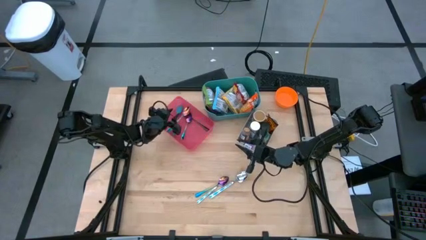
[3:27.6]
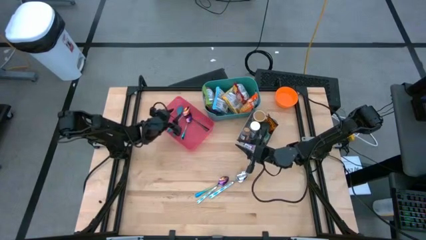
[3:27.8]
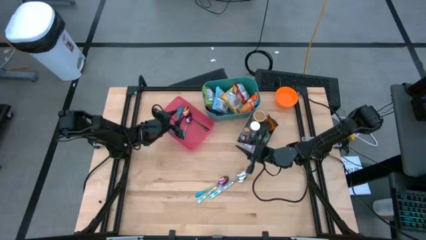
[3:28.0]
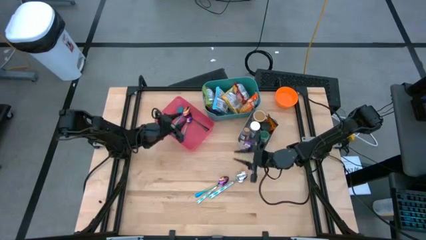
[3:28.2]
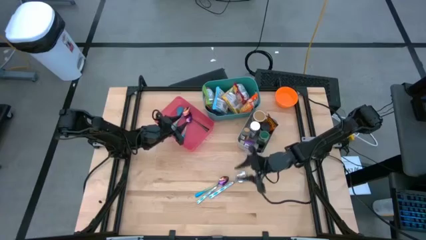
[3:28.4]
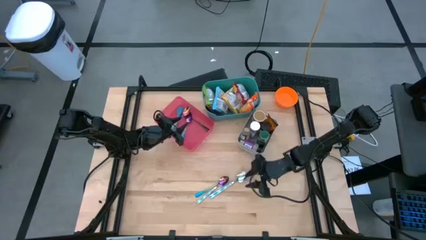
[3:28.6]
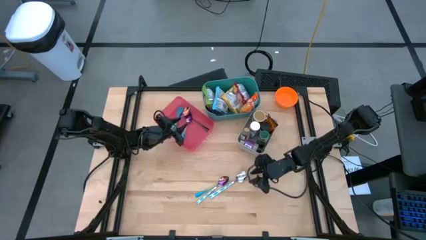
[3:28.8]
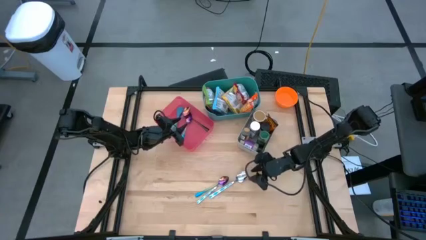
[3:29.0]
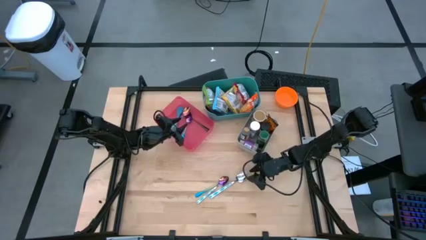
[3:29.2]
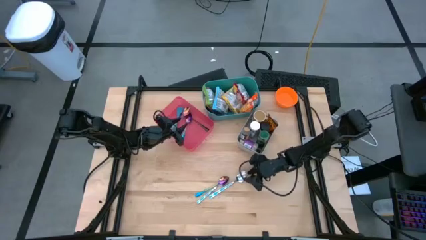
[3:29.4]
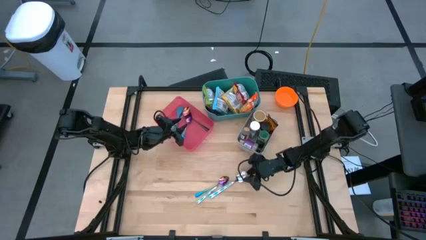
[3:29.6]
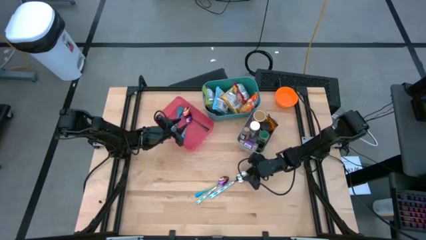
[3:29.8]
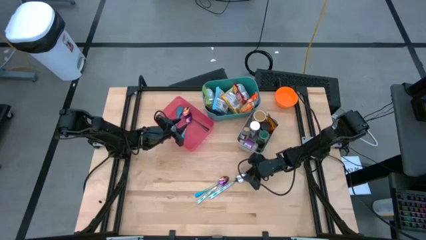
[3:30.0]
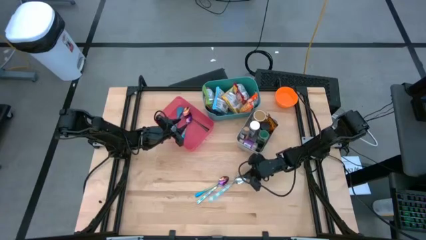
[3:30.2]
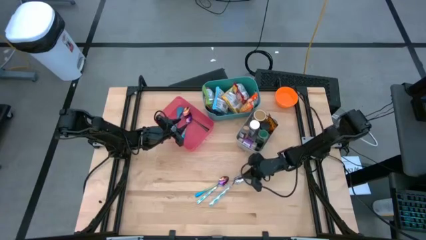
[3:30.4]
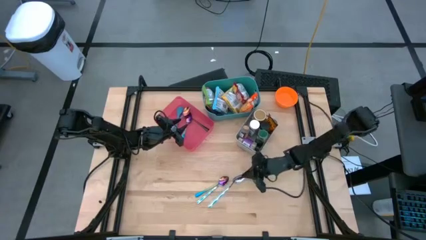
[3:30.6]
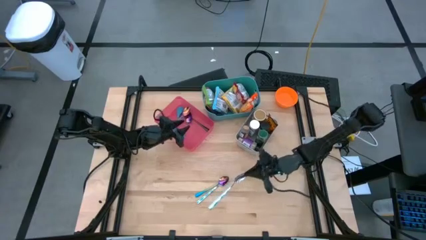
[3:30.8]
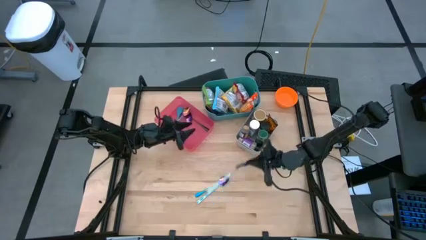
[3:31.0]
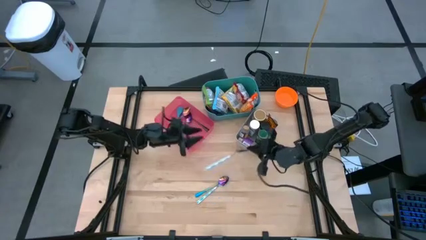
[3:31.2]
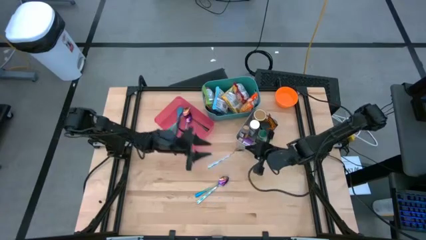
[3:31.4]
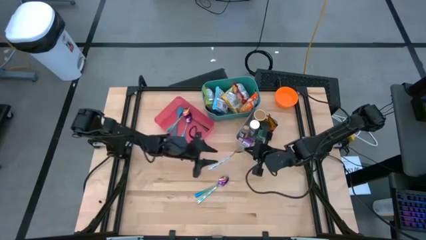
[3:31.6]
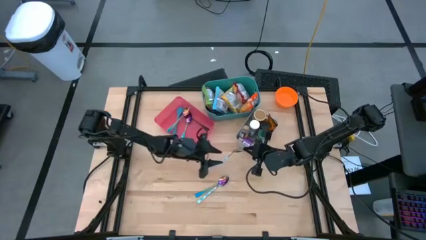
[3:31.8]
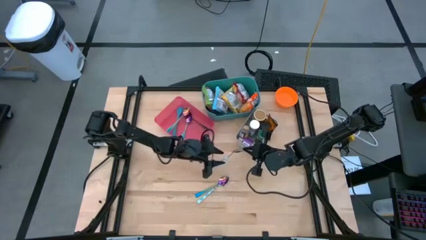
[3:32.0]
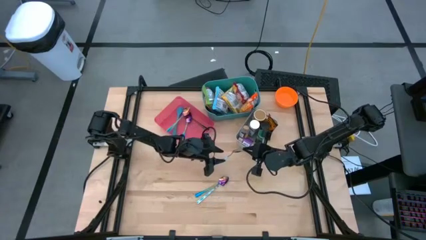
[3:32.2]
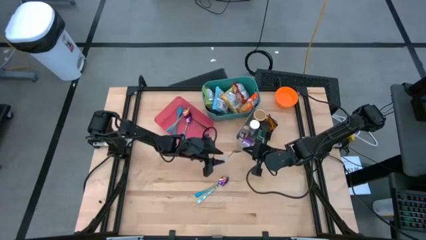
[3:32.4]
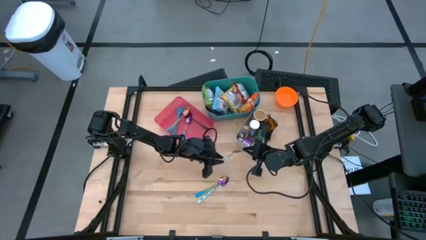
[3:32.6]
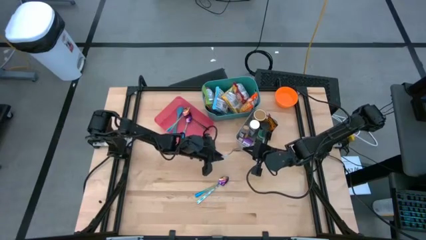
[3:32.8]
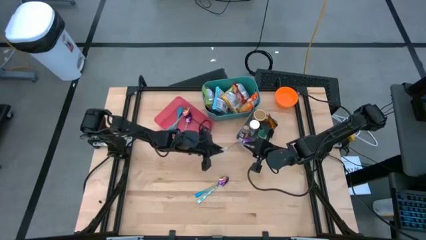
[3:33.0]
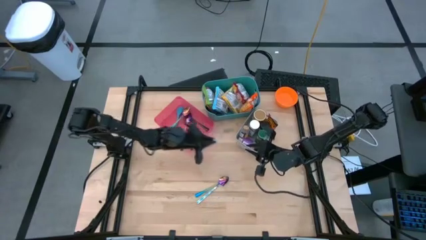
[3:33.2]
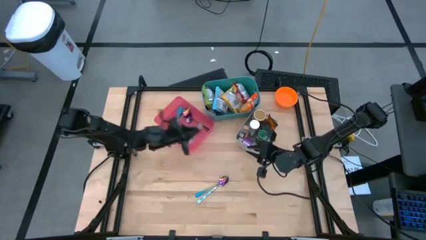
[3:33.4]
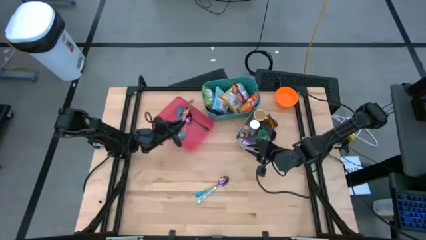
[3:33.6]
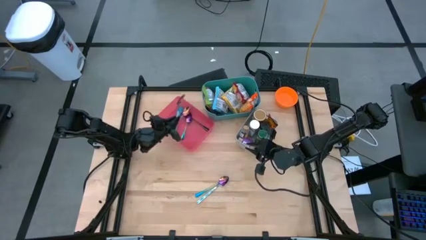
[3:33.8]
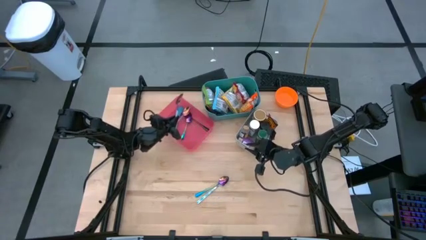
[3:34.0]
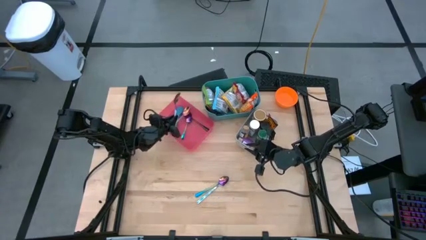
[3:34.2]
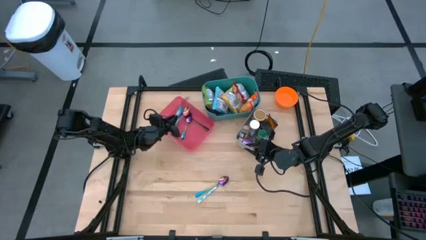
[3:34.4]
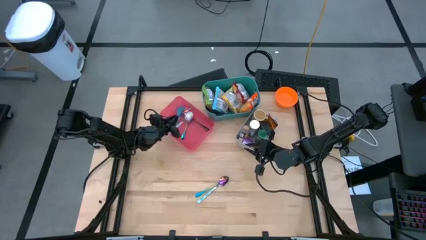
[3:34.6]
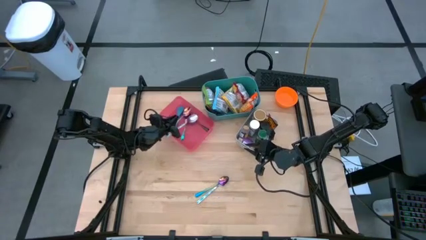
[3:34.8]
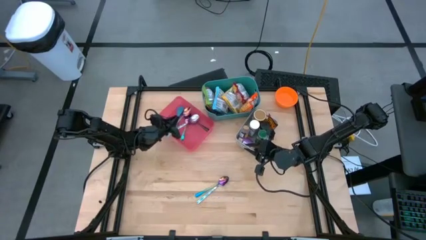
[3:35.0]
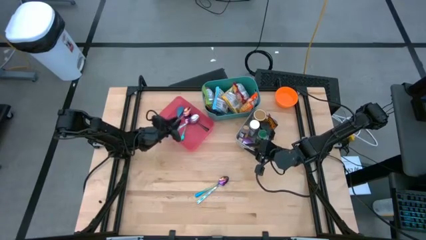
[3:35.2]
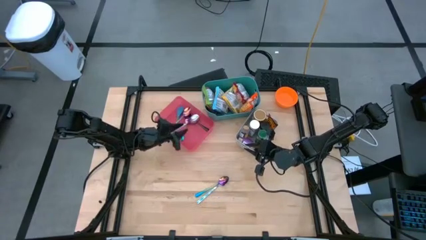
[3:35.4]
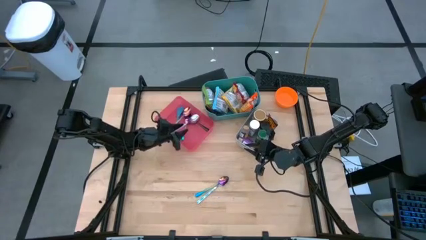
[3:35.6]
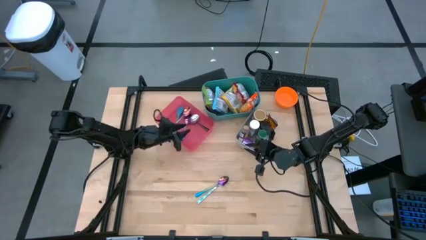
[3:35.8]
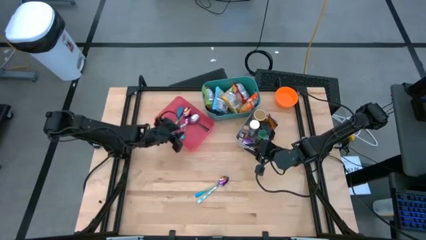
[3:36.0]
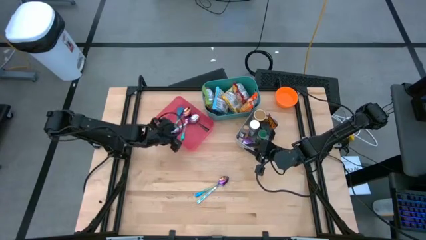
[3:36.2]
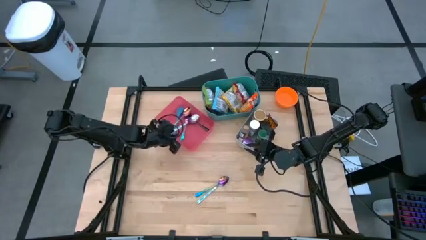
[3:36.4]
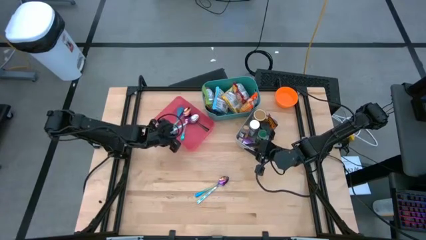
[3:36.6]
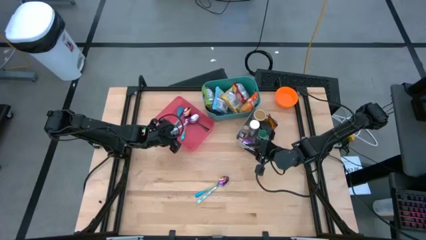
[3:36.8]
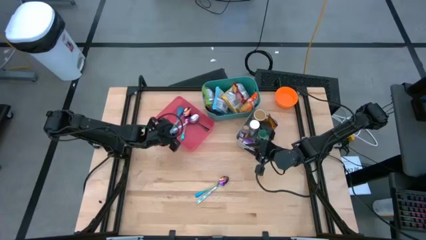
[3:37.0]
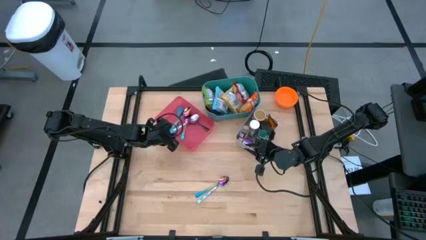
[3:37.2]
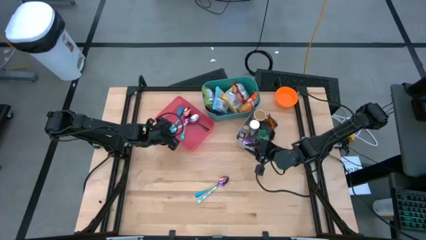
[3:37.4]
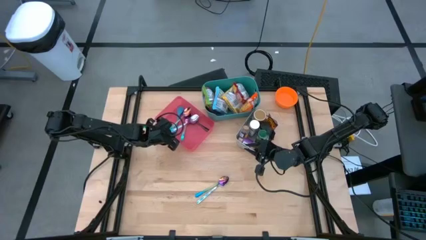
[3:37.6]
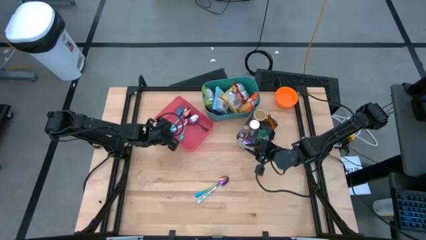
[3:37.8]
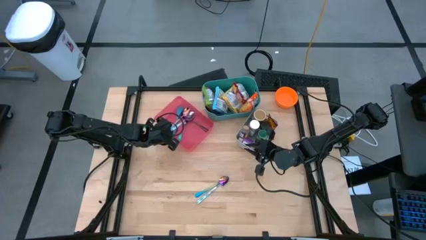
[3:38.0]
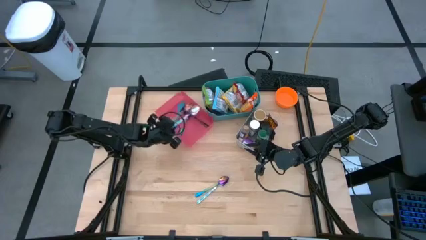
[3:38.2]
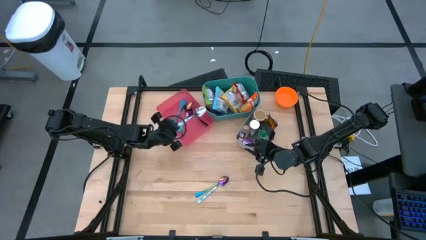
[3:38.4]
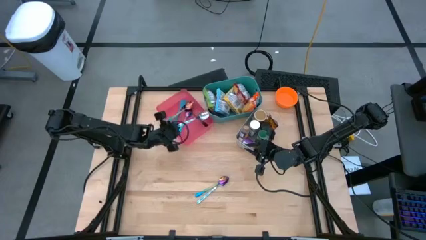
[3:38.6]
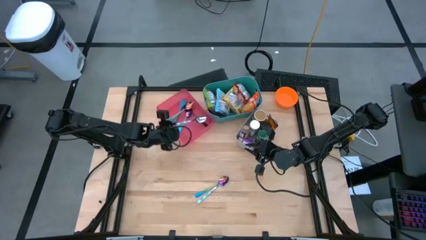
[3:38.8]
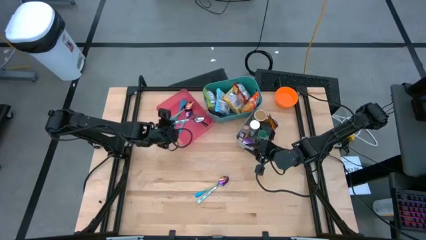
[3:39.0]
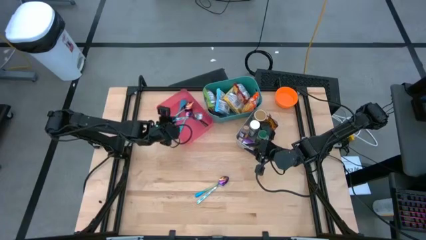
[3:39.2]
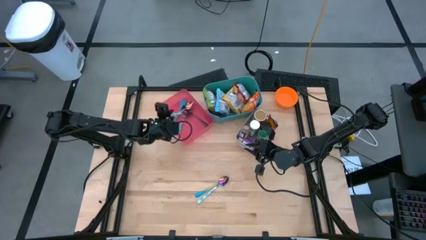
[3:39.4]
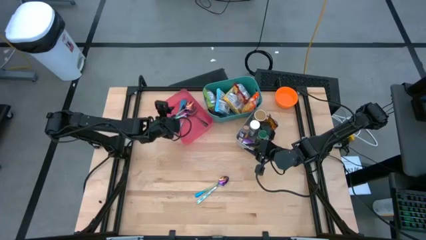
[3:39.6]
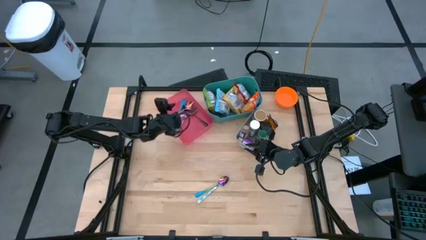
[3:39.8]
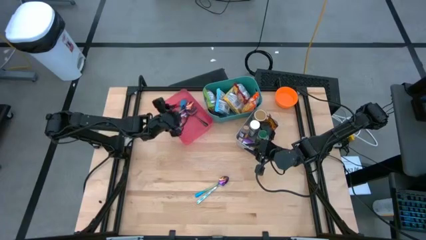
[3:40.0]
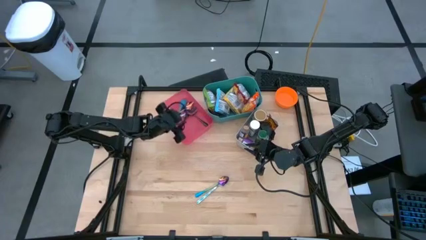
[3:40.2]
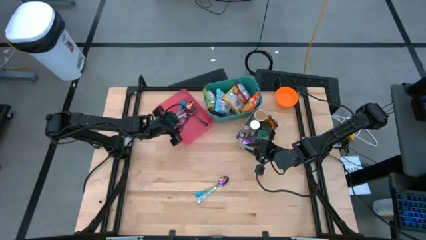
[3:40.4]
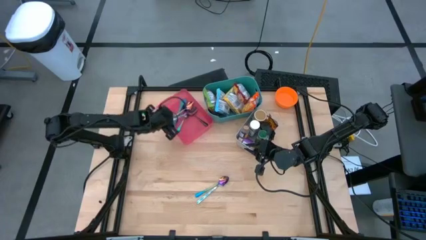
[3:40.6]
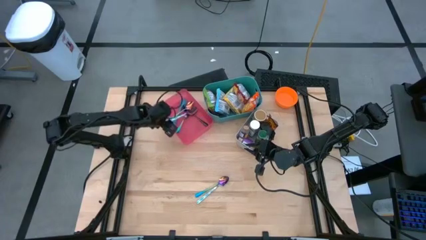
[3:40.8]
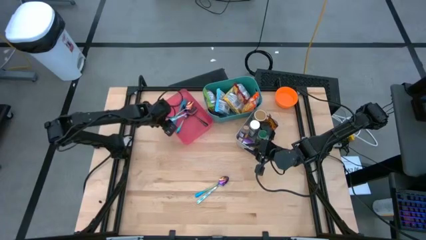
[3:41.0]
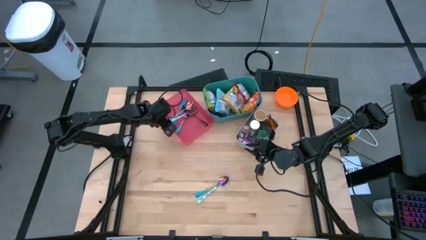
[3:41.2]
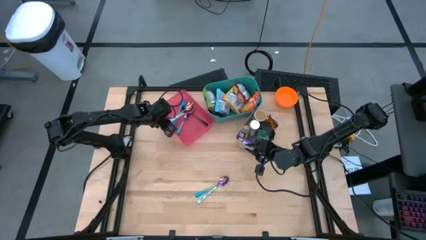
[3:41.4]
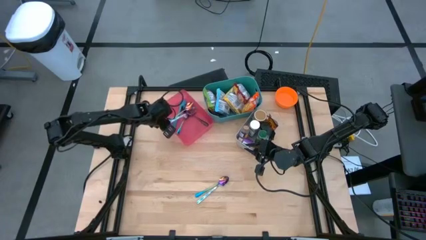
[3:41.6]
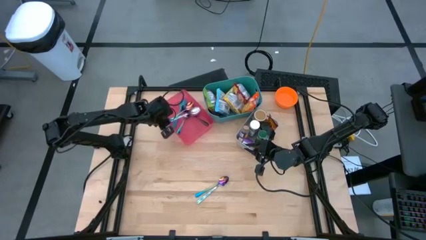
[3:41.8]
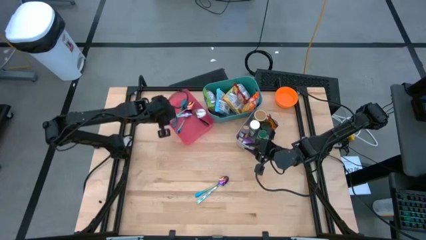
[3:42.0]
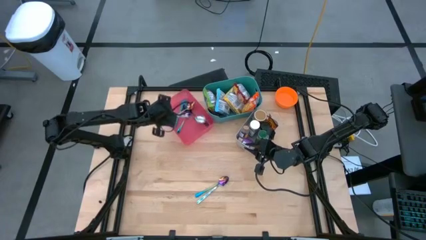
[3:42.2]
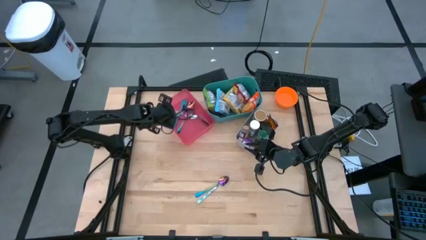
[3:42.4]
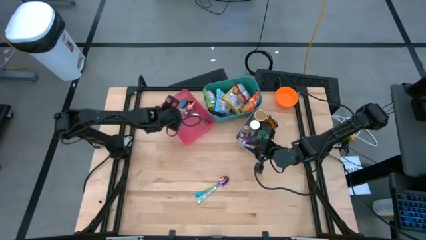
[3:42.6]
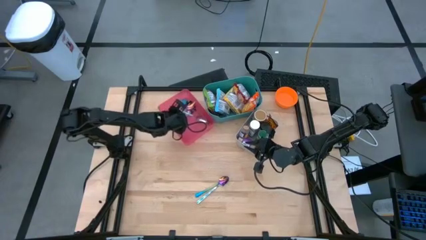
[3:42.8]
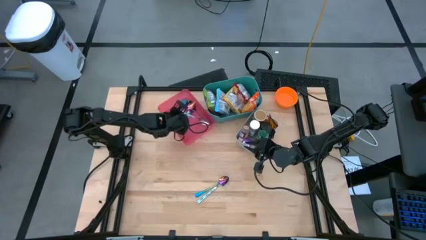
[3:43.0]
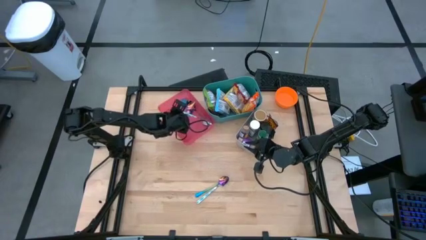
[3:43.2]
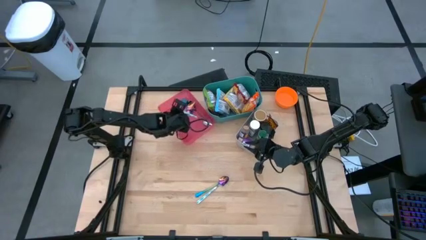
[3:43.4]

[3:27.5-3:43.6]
Task: Pick & Place Food Item
Put the silver spoon into the red bin

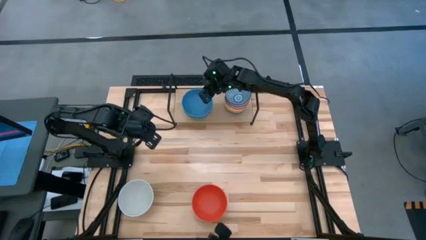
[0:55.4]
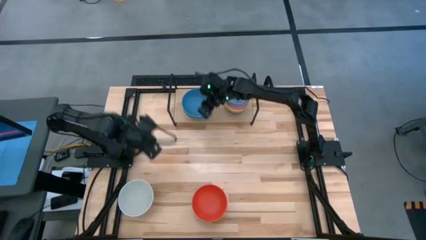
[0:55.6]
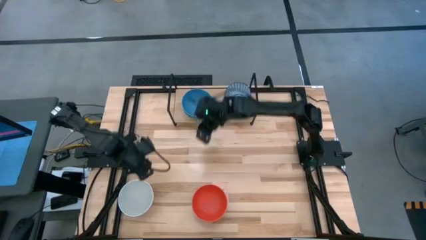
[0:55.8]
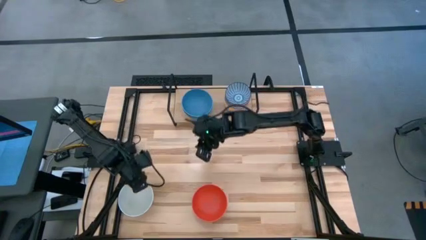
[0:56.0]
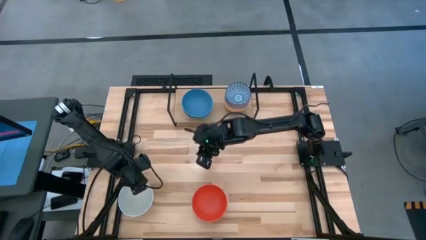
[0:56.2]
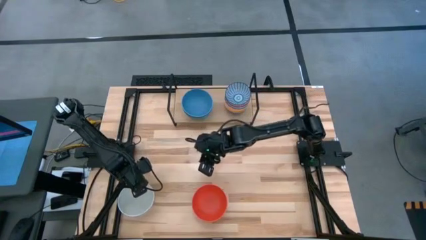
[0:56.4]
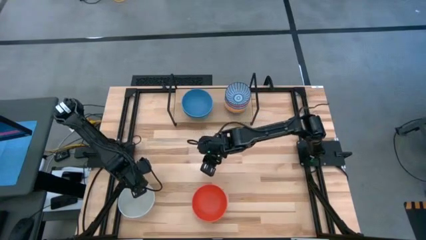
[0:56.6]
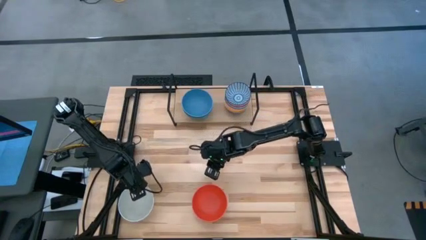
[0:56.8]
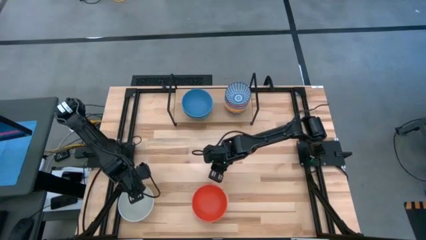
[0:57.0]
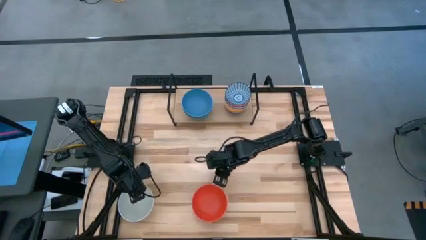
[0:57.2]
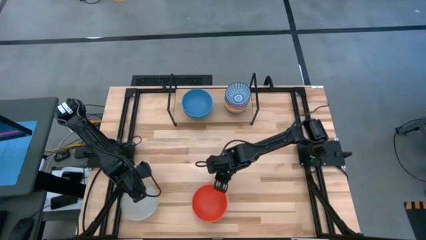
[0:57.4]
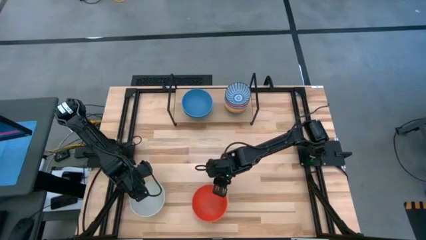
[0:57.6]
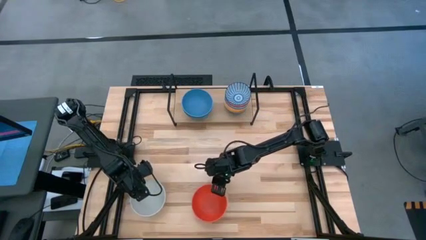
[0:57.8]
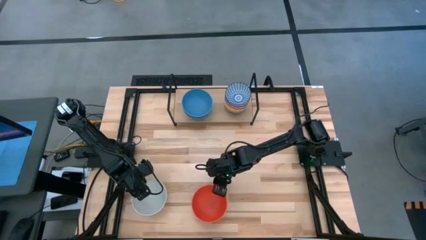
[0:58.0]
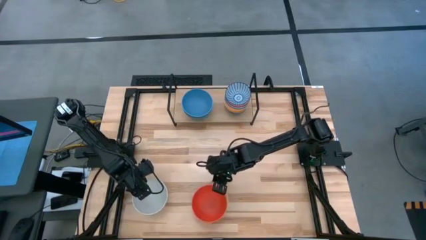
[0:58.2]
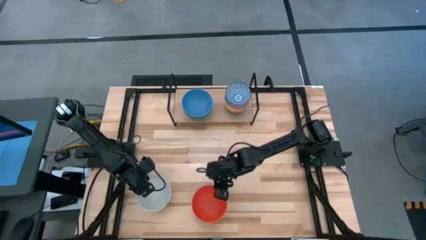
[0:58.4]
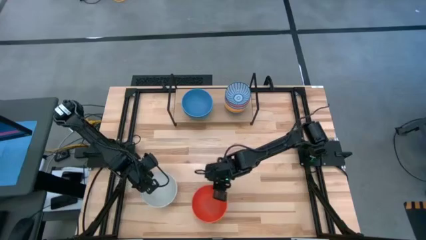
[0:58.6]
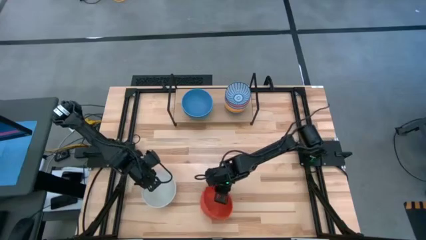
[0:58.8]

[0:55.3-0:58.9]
Task: Place and stack bowls onto a shelf
Move the white bowl to the right
